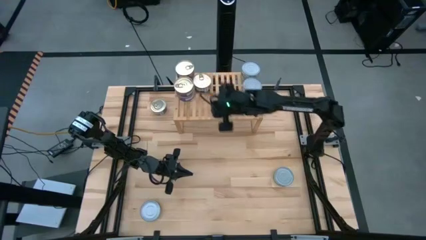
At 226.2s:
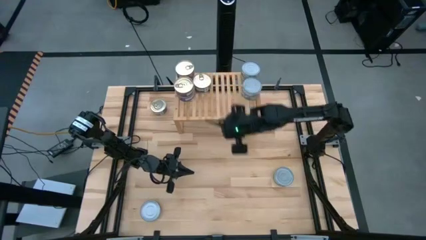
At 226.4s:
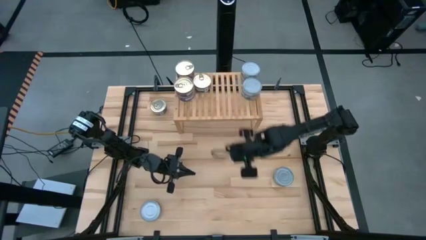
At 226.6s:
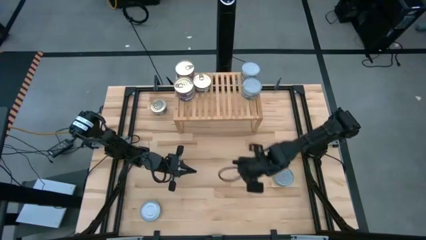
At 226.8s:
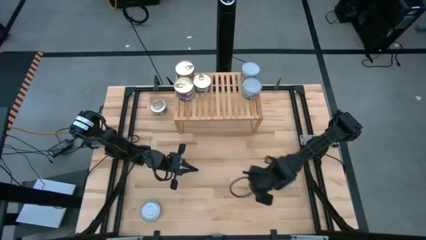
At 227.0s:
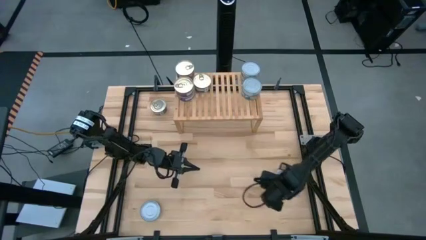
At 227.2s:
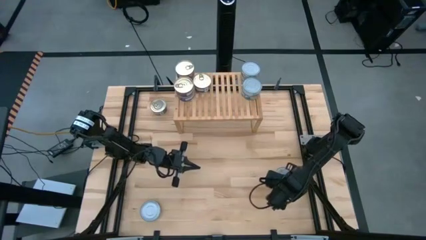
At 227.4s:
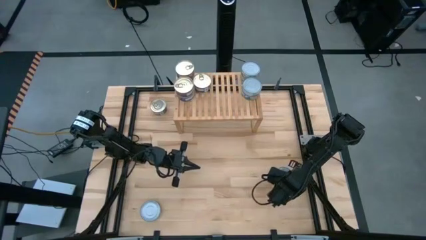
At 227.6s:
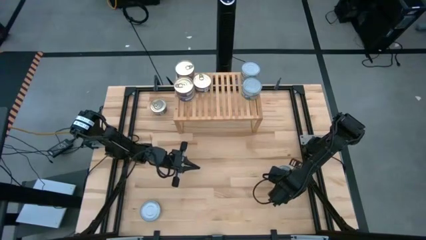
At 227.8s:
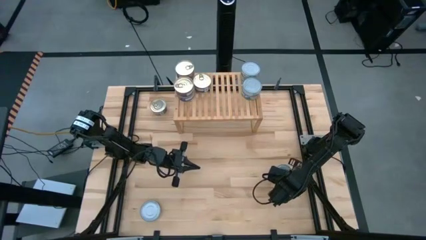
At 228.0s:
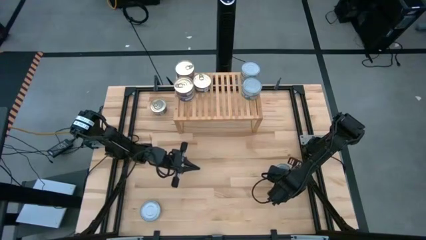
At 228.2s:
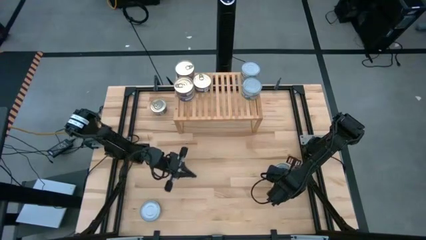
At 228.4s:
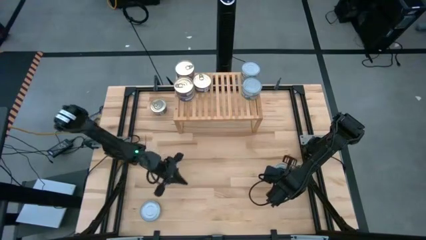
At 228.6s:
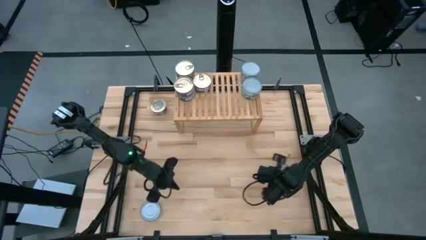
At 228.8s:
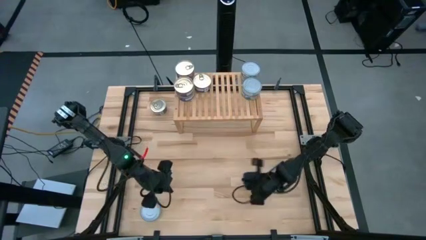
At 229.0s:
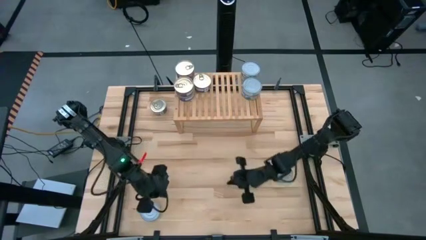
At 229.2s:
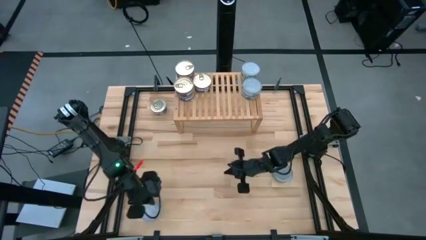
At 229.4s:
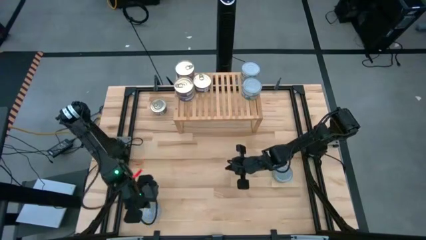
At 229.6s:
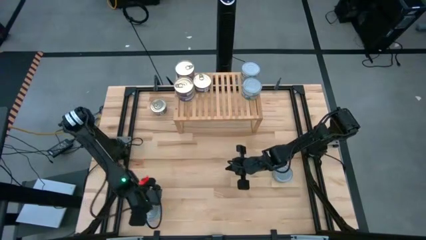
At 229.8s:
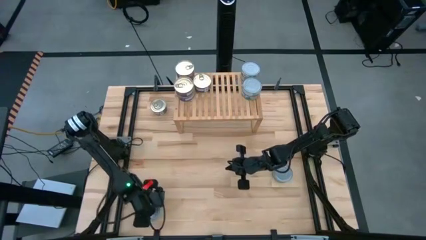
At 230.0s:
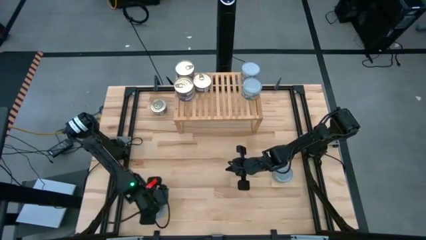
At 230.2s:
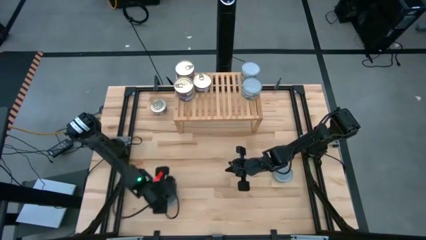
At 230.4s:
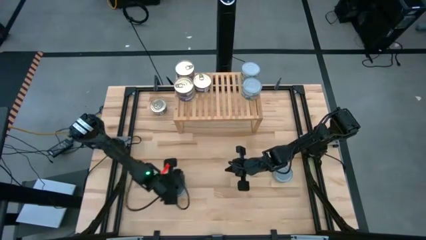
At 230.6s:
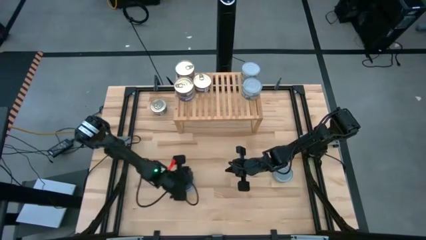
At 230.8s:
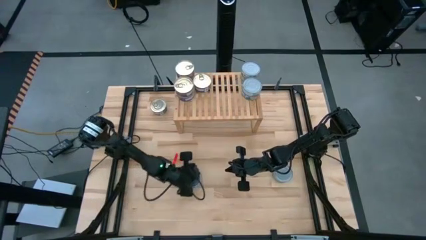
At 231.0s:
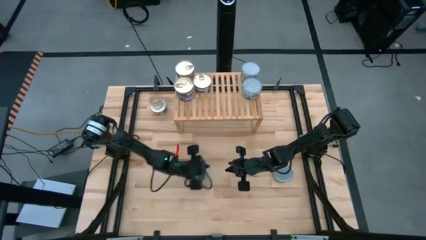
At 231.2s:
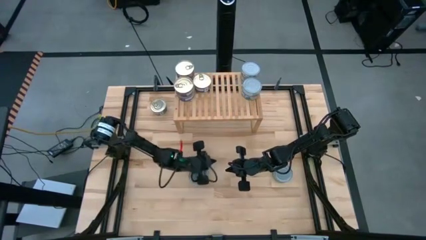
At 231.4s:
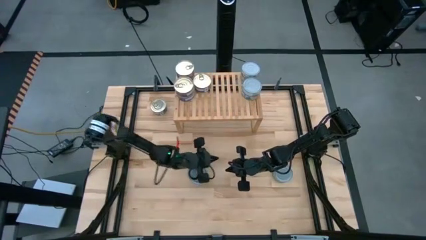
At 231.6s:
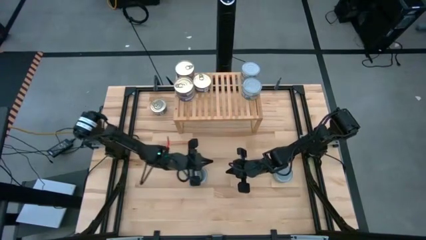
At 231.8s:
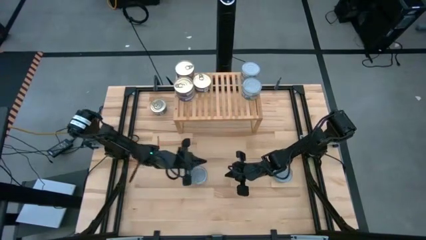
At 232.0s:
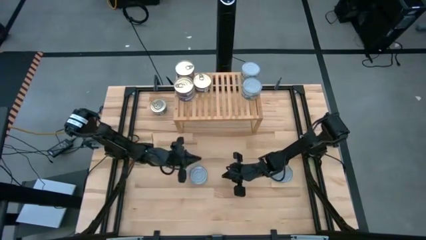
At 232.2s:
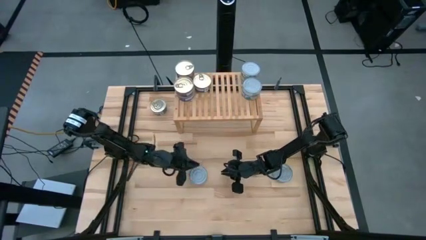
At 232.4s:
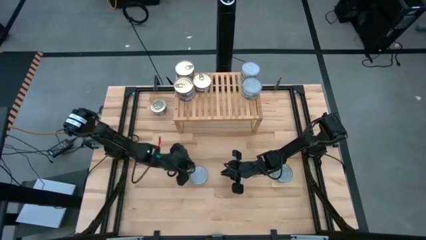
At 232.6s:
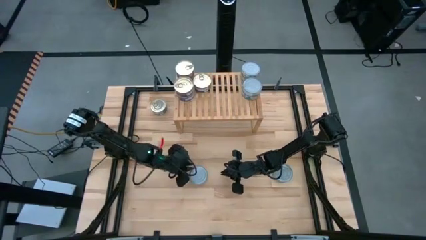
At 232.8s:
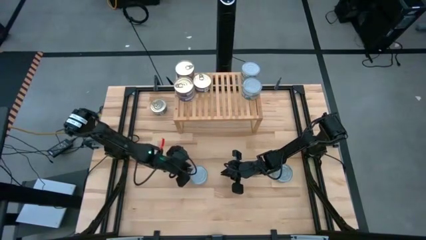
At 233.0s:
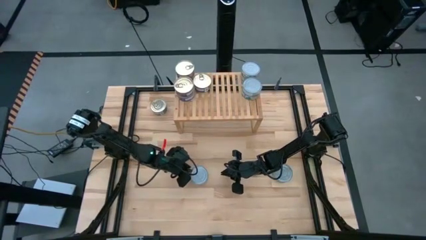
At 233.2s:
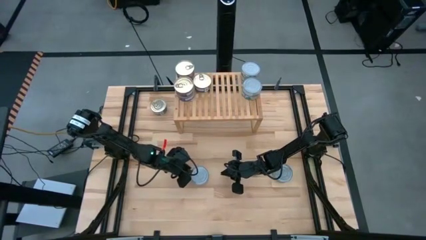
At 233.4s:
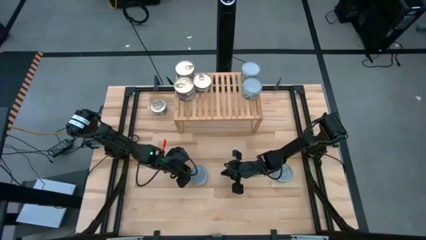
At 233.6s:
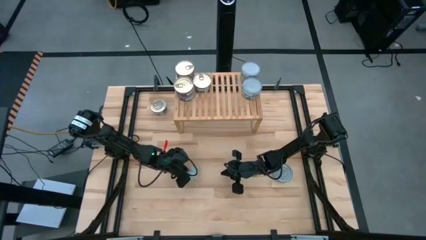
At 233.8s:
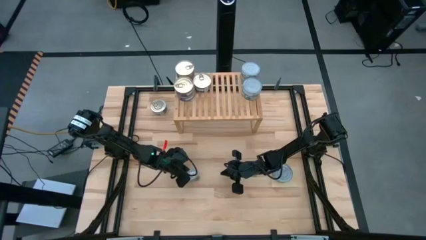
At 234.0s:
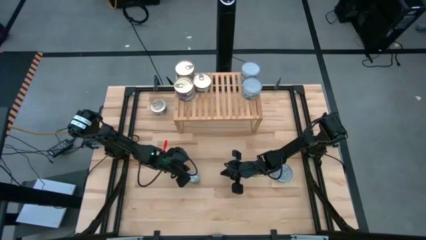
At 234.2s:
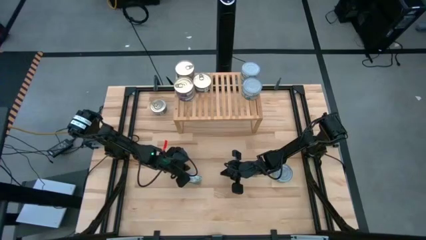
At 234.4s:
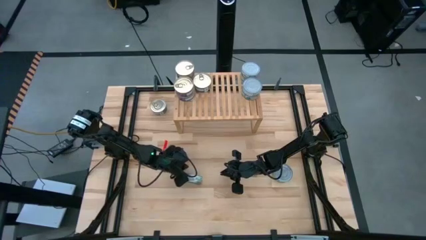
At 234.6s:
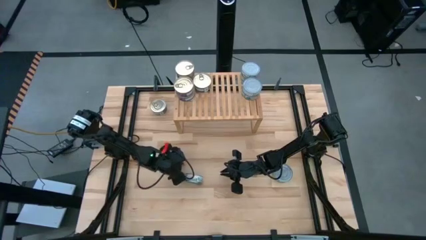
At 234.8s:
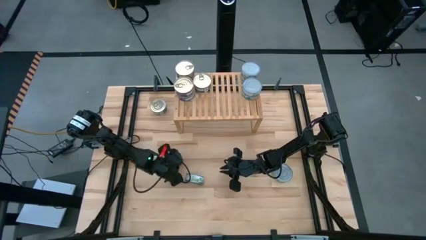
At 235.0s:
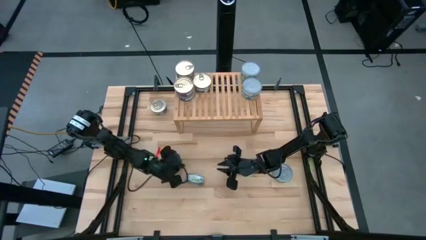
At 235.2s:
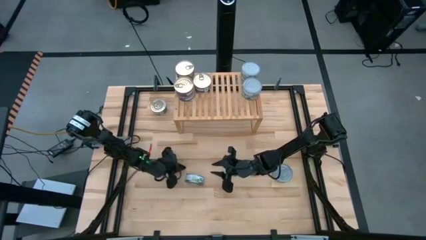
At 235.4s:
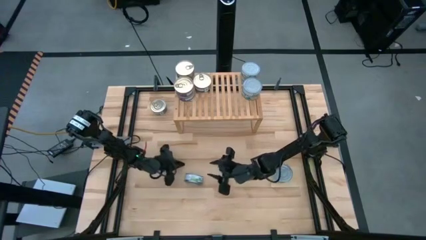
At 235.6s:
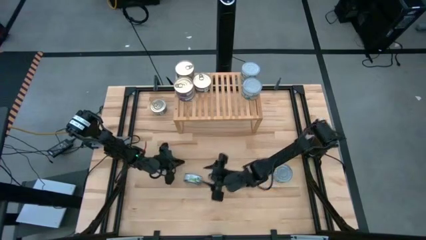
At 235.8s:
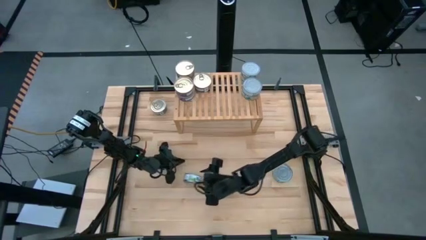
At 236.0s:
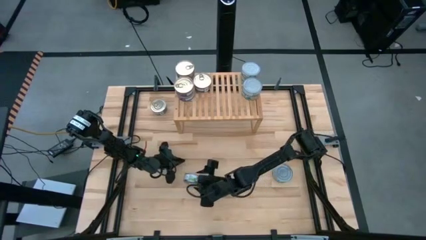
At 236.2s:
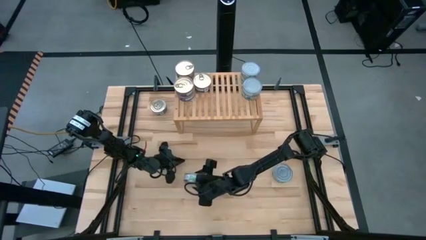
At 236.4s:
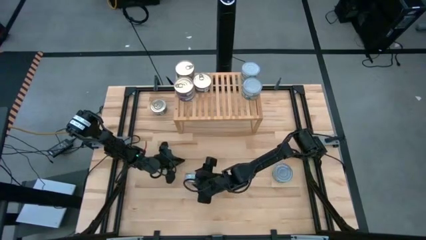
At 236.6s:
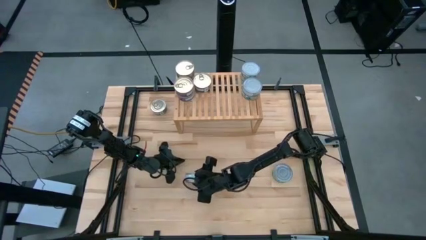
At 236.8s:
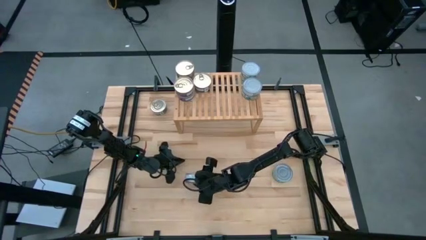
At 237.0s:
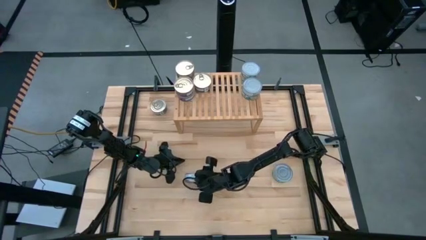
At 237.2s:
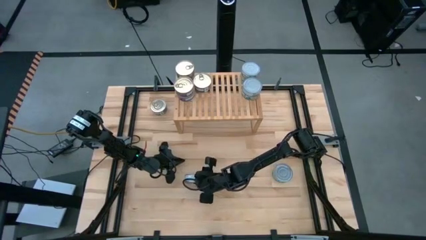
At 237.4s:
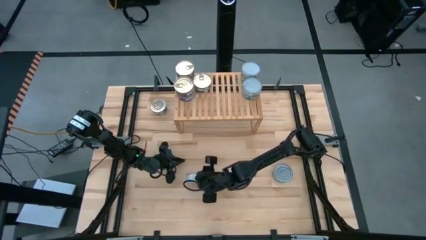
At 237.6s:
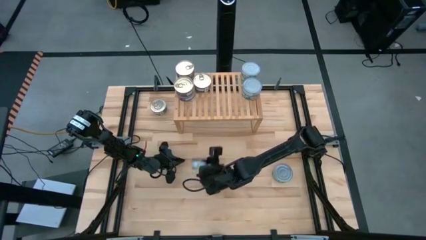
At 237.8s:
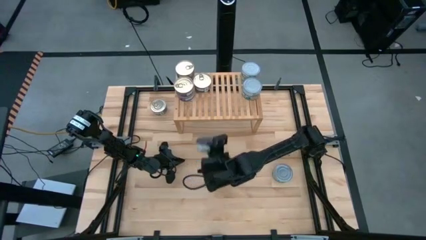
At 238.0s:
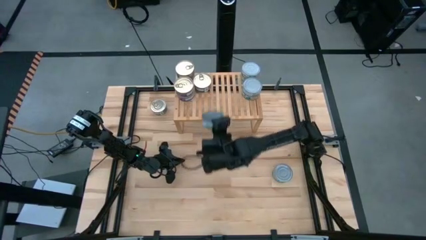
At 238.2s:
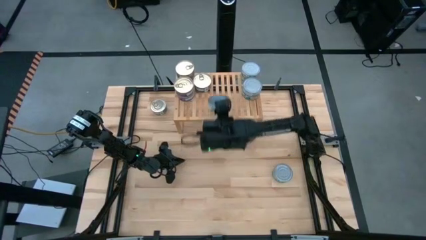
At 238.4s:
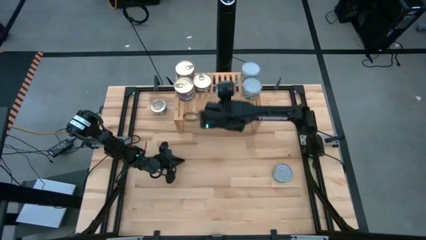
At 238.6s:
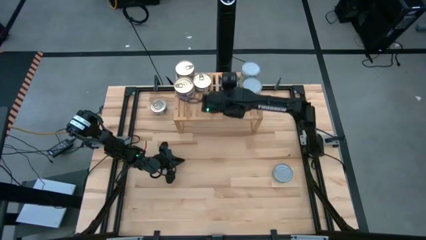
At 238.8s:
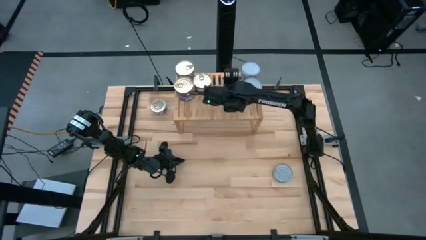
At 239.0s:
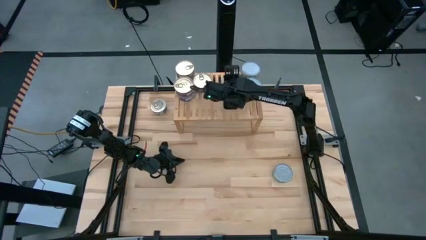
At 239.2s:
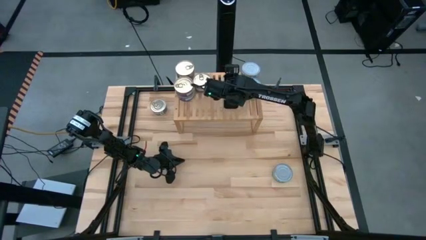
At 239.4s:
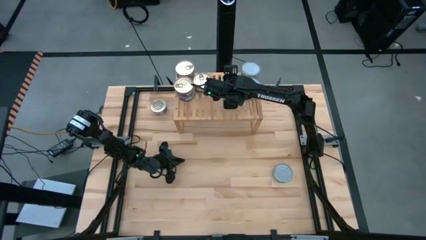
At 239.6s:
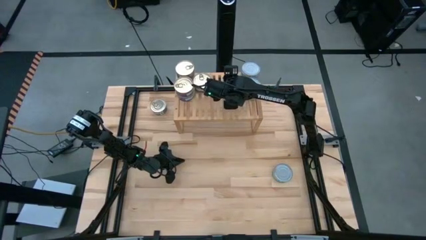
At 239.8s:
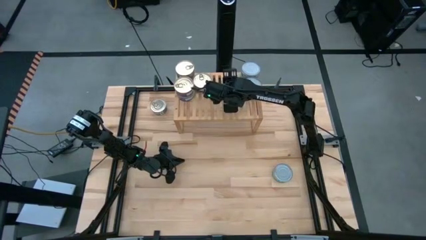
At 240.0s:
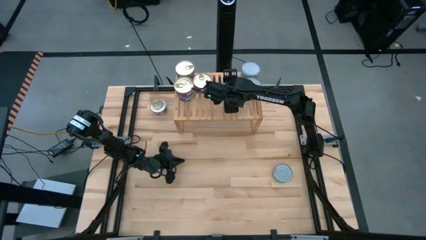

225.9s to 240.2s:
Task: Stack canned seafood by type on shelf
Put the green tuna can on the shelf

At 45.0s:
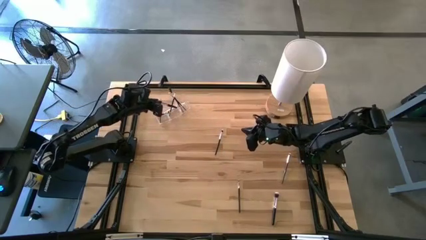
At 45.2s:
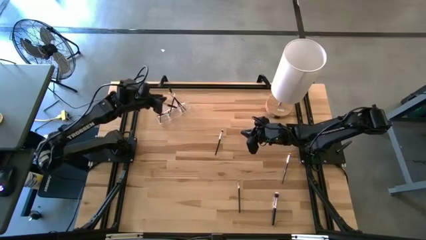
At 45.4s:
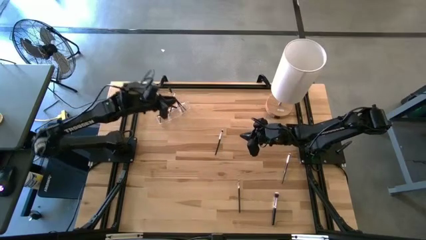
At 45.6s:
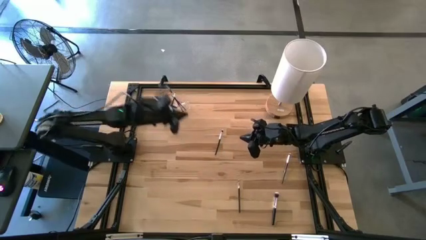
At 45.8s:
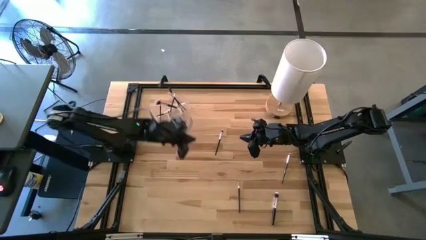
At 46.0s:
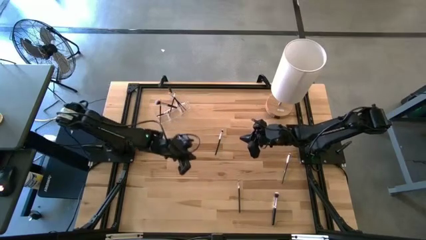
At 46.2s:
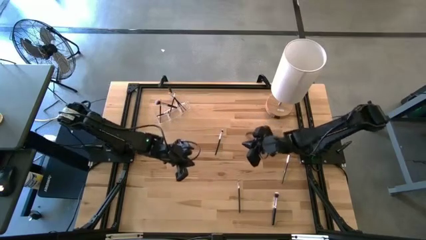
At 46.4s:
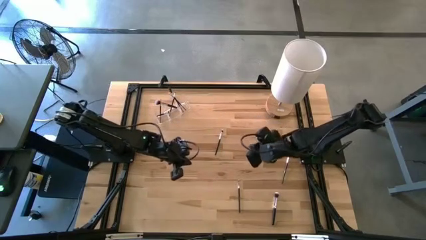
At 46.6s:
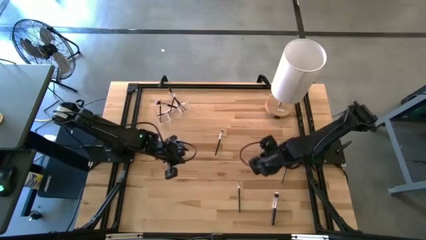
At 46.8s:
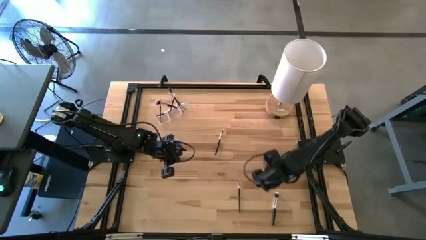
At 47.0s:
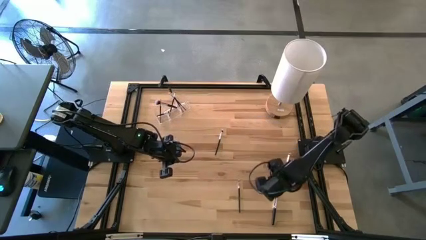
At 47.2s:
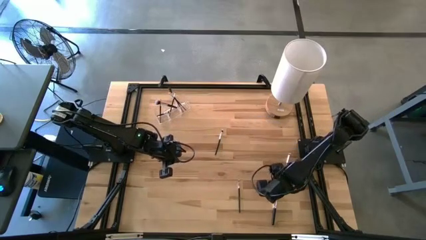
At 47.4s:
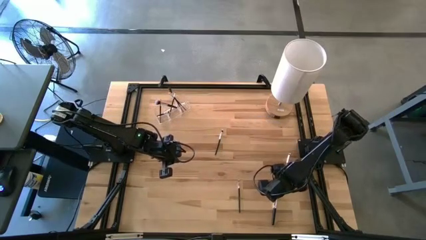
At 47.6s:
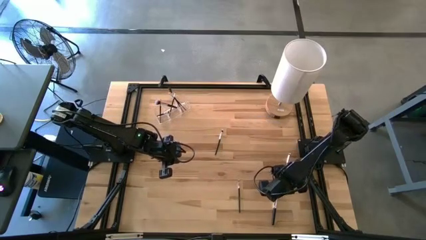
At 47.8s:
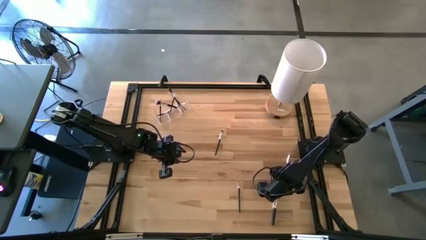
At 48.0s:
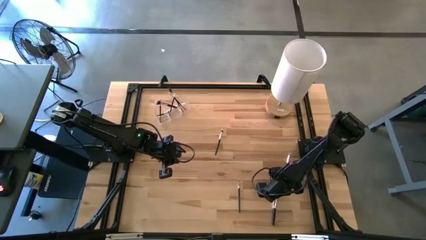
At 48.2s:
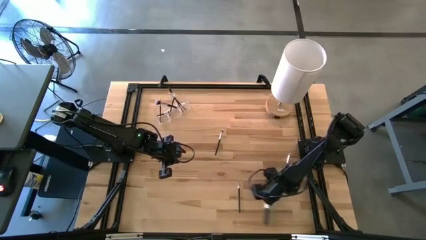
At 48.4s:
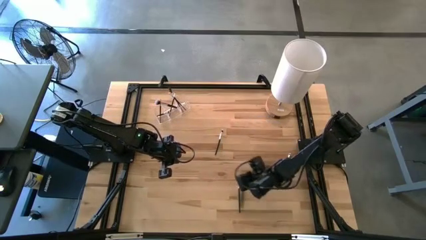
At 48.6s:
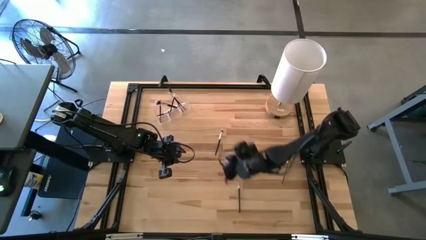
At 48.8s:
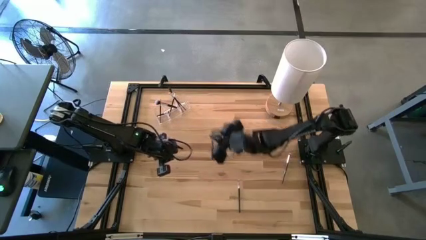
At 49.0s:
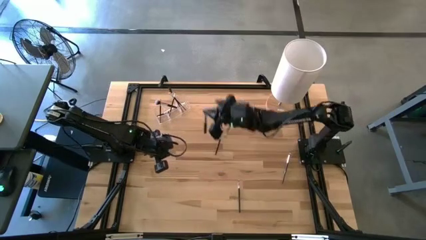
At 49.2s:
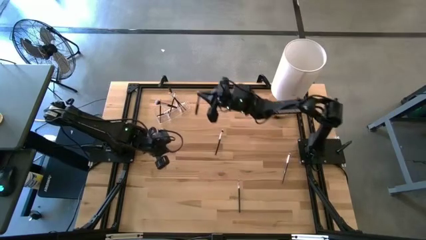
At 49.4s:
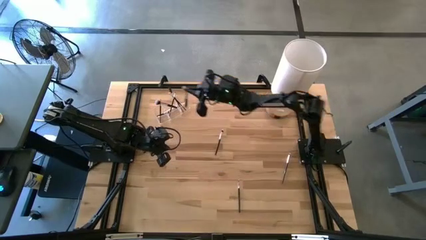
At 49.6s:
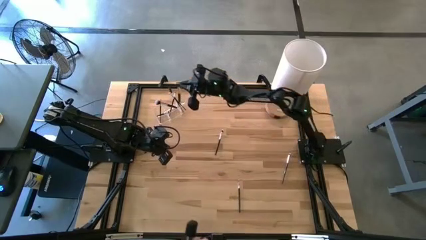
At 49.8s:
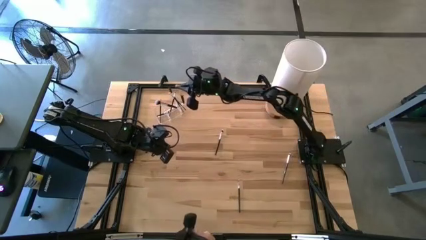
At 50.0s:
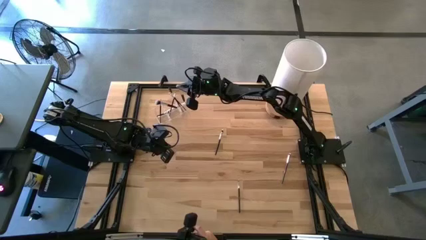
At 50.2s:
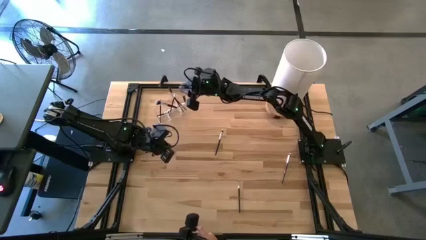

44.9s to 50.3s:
Task: Put items in baskets/containers
Put the powder brush into the transparent organizer
